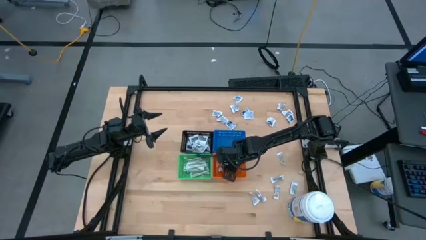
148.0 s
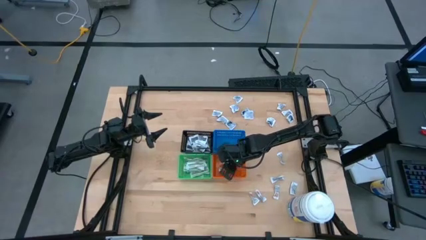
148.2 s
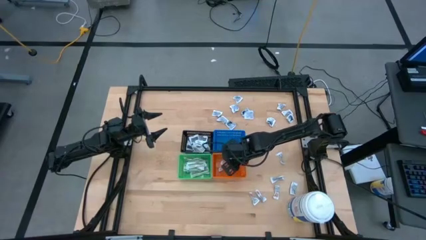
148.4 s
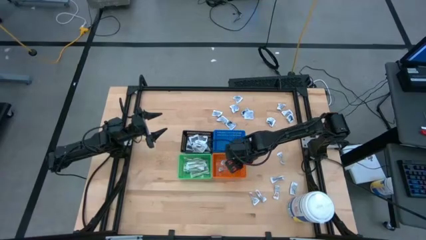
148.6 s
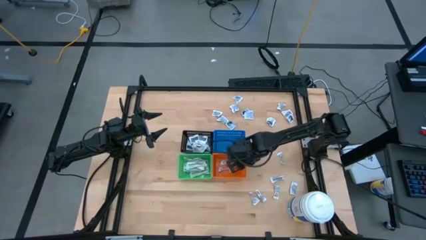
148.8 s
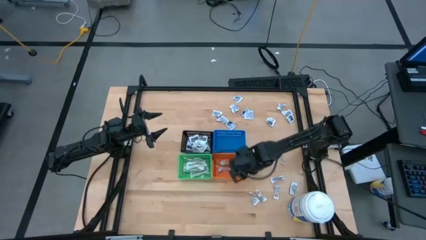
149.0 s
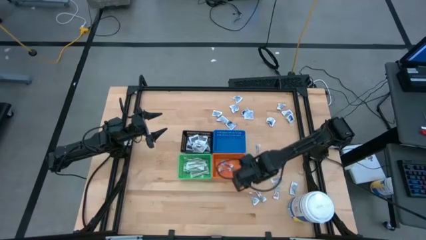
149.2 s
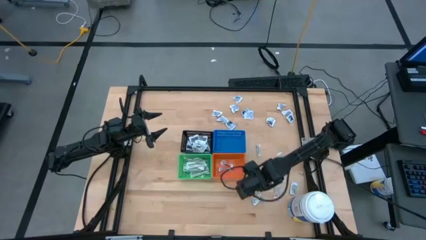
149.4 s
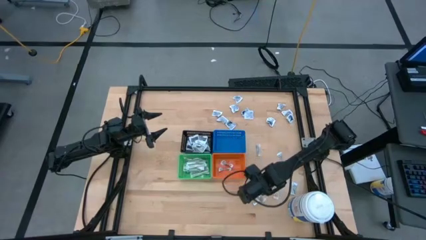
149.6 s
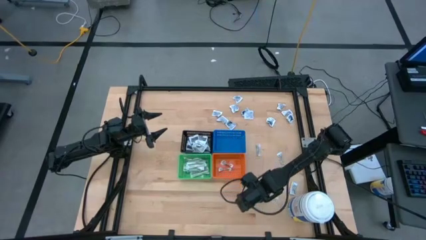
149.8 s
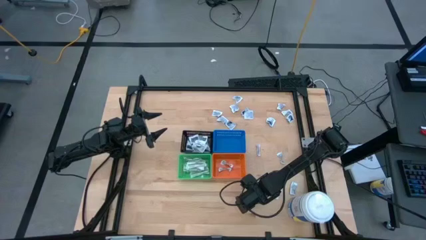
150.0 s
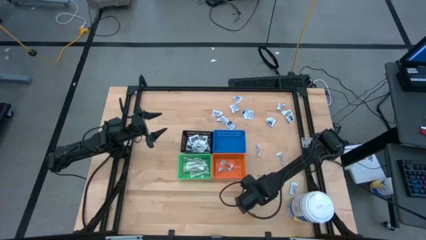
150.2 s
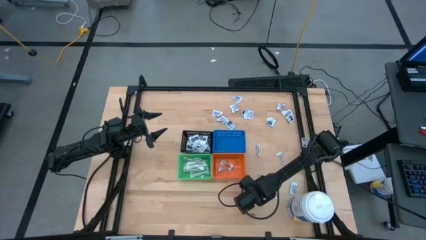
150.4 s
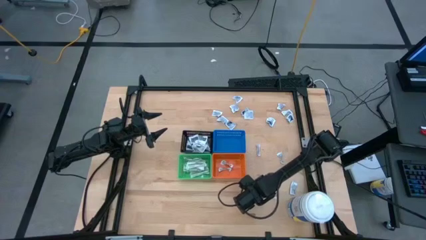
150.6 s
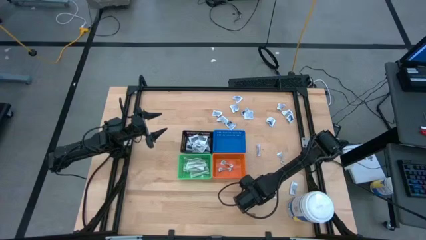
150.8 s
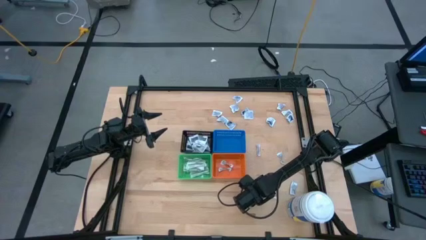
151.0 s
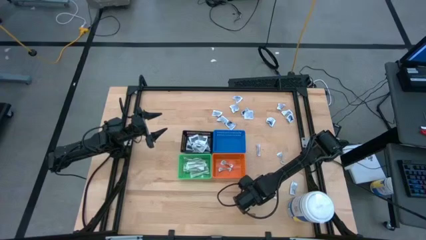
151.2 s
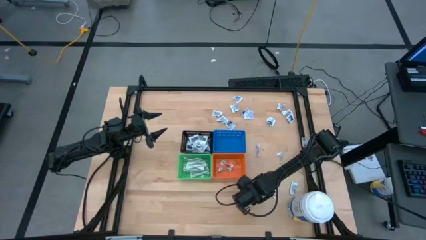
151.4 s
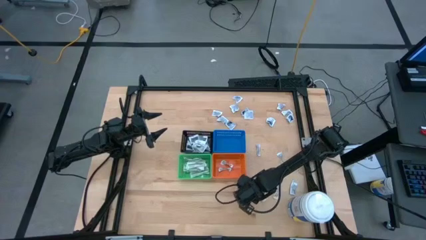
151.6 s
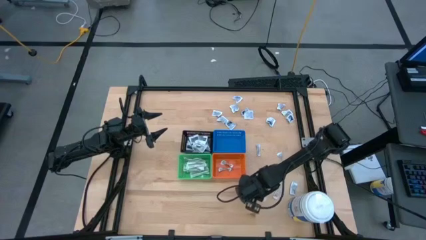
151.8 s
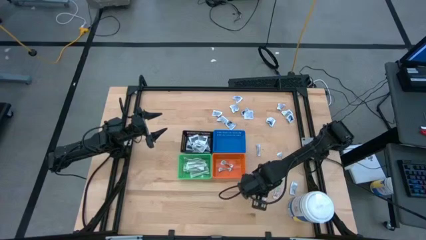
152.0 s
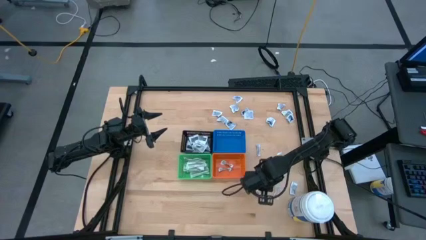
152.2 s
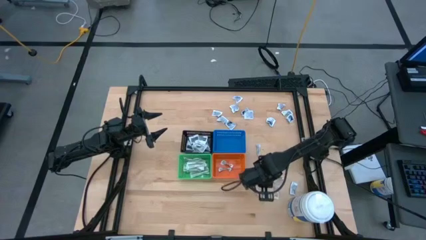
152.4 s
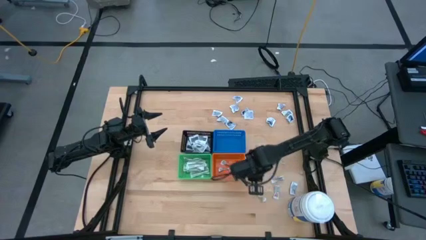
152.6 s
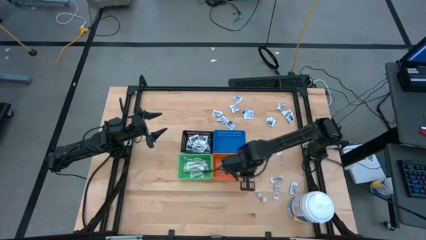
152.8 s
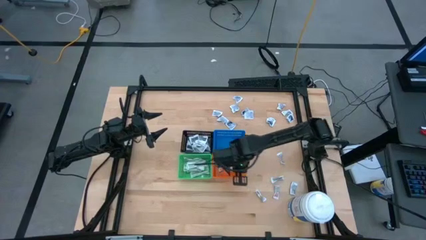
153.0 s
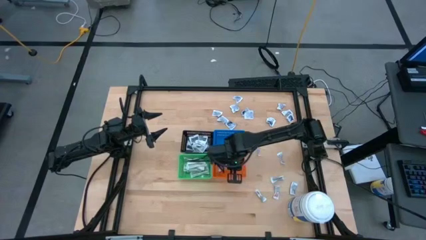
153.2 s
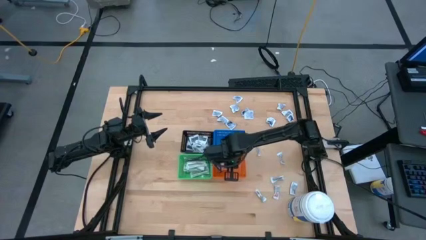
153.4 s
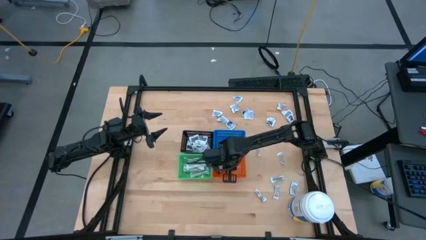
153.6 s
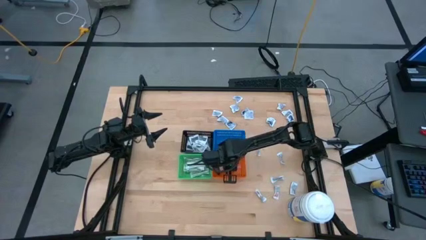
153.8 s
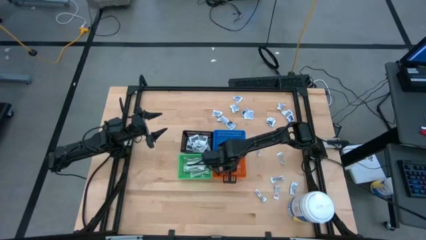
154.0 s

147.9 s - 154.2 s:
Task: Pick & Place First Aid Supplies
Put the ointment pack into the orange bin

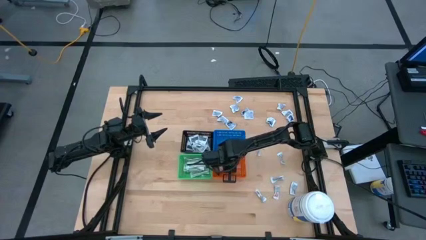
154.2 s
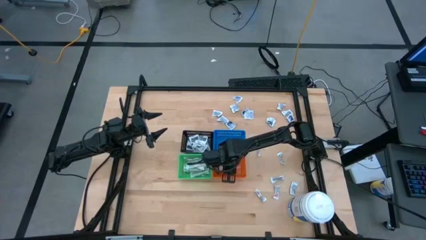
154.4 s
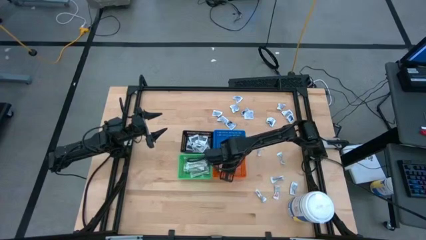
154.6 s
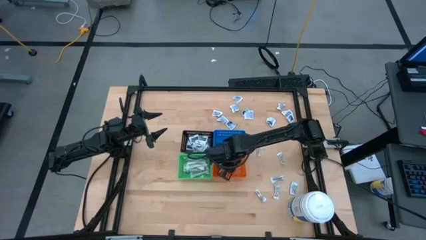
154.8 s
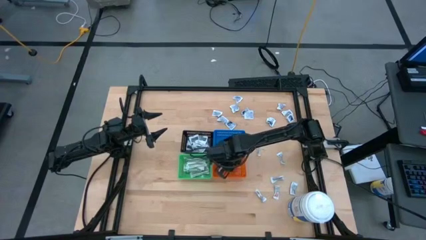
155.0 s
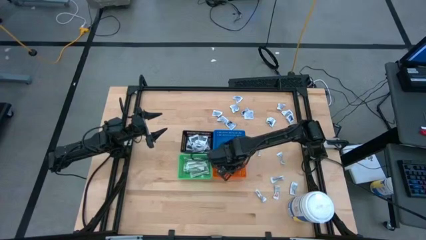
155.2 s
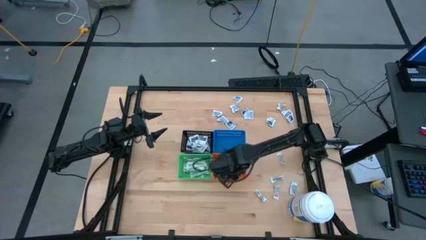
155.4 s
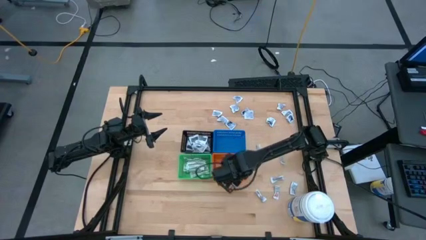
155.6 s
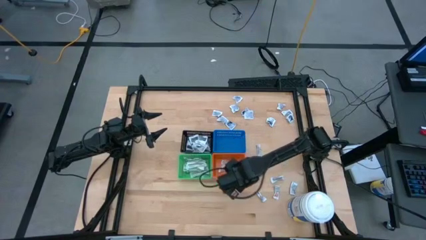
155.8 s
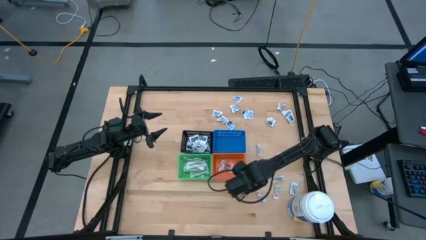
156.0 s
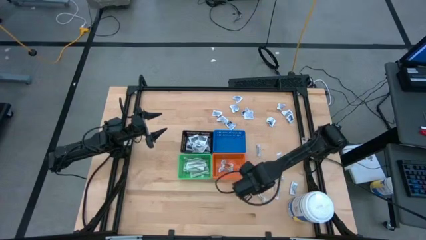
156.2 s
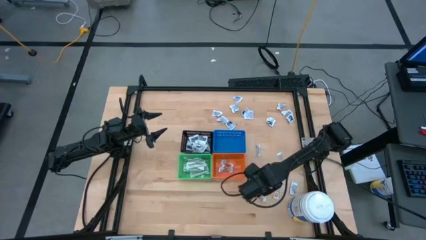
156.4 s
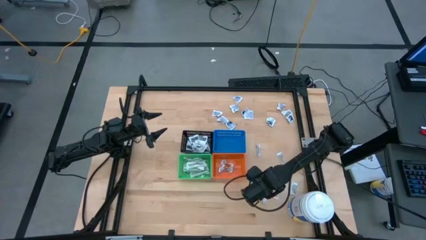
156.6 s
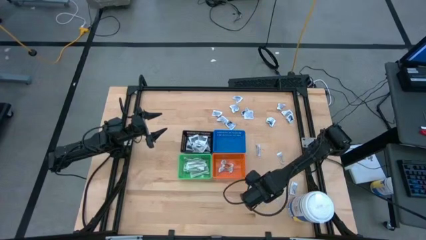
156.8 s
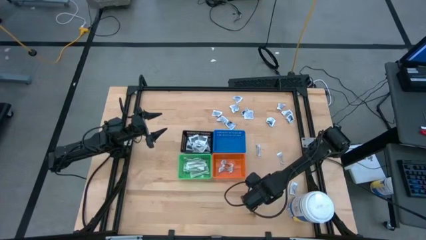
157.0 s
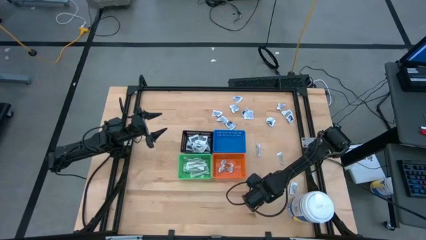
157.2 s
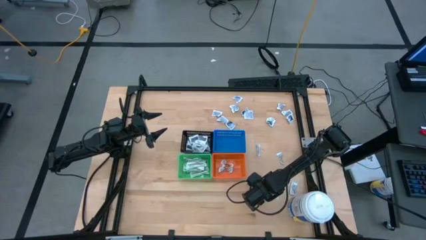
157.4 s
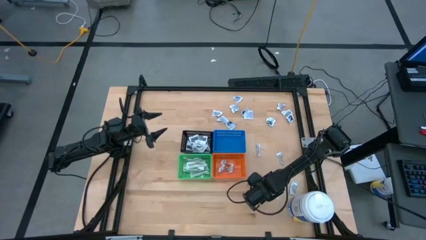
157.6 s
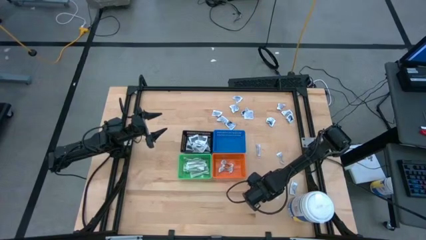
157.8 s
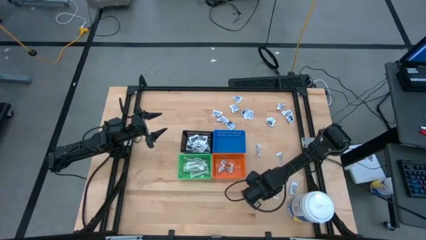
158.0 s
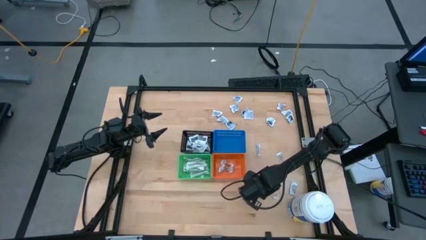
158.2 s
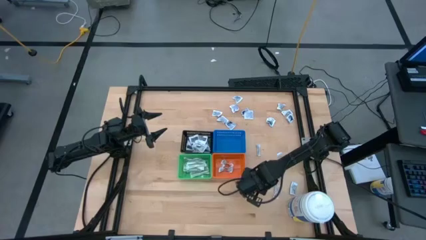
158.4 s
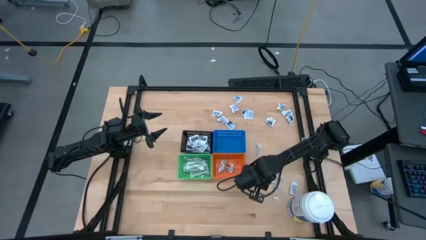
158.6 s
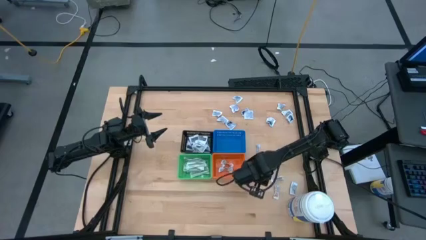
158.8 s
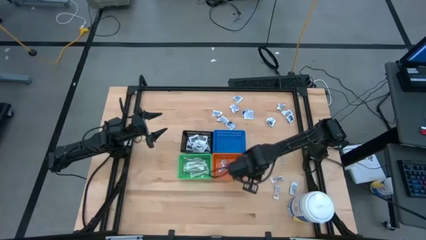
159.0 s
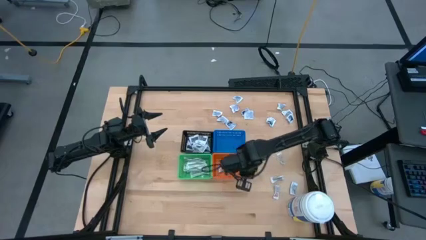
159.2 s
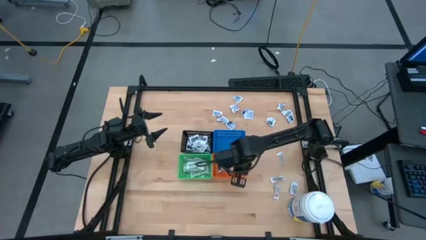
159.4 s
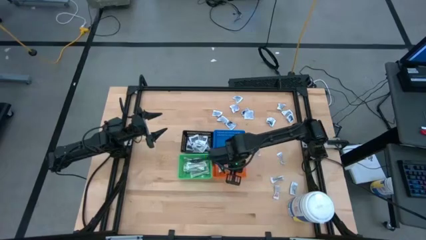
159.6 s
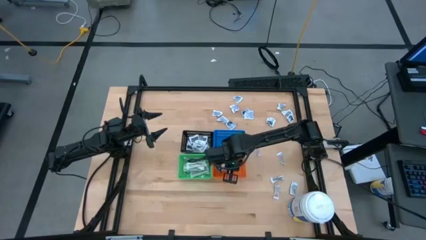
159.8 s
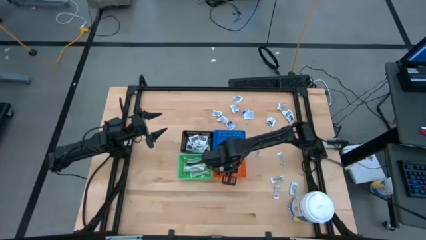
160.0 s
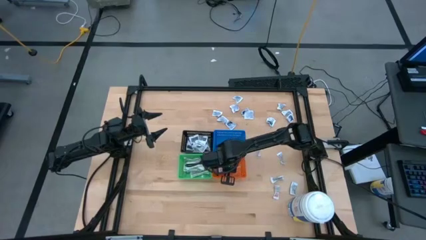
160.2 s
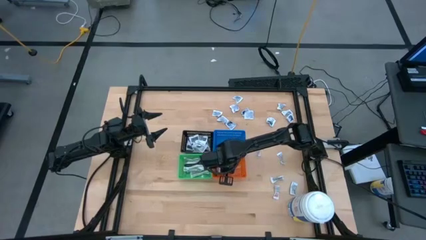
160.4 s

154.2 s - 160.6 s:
Put the ointment pack into the orange bin

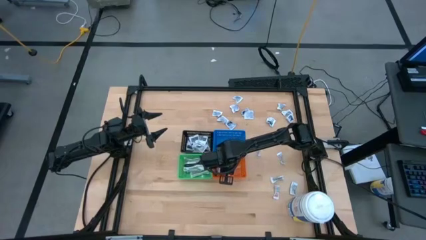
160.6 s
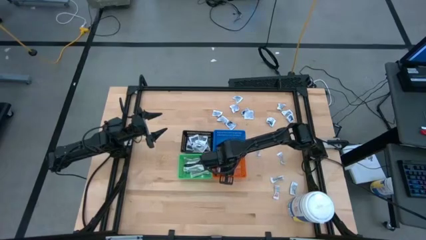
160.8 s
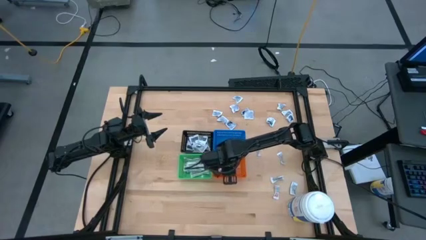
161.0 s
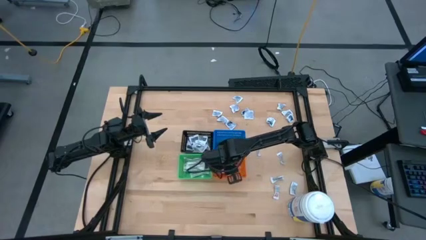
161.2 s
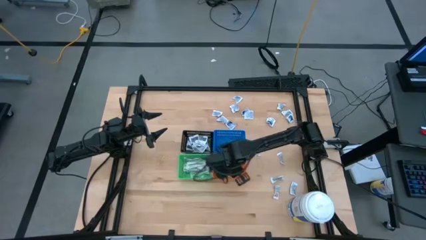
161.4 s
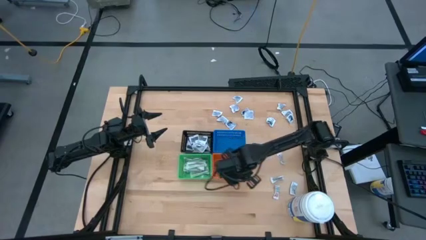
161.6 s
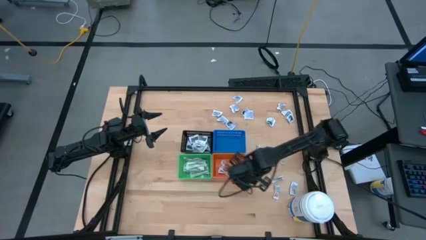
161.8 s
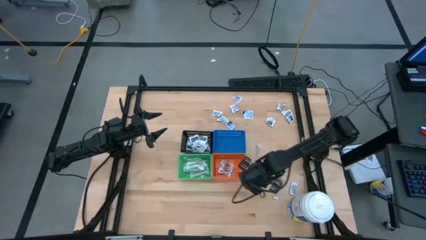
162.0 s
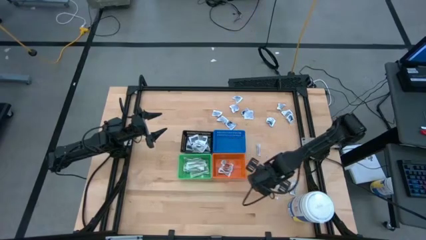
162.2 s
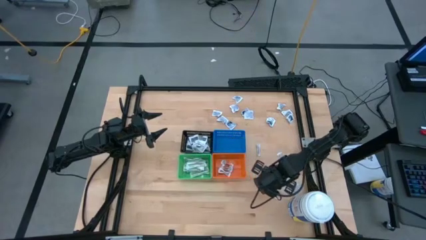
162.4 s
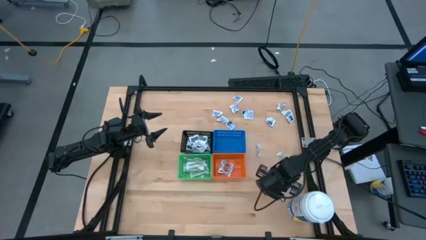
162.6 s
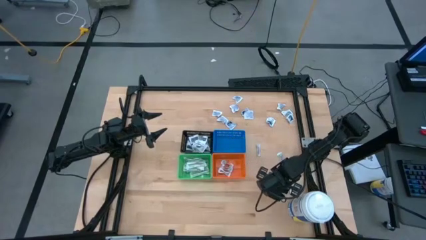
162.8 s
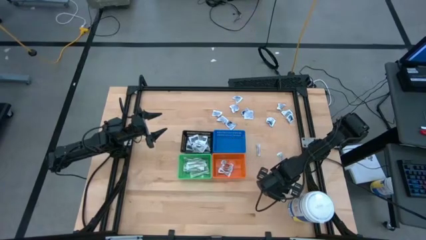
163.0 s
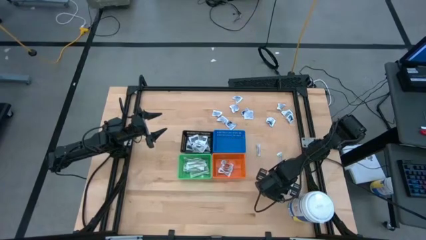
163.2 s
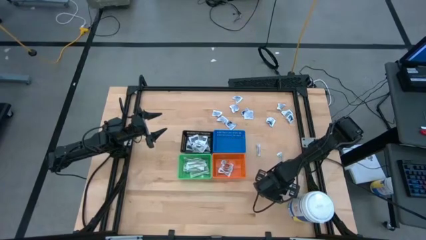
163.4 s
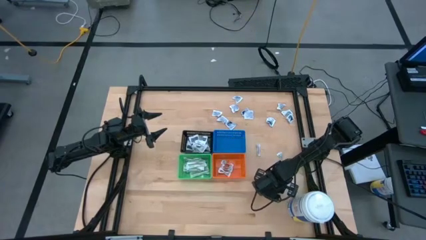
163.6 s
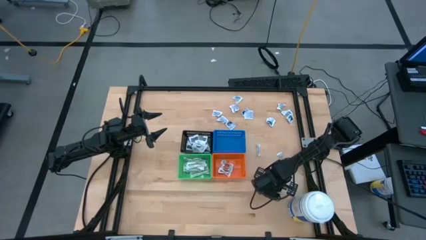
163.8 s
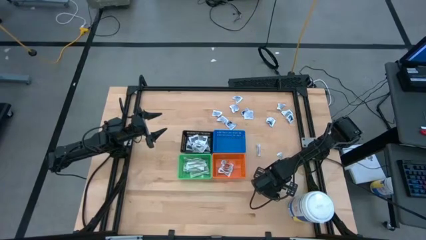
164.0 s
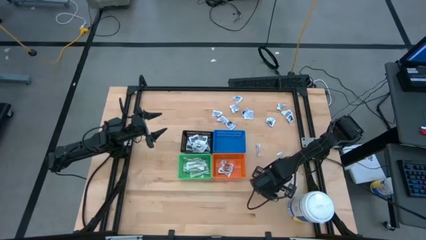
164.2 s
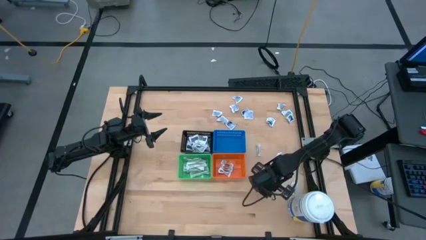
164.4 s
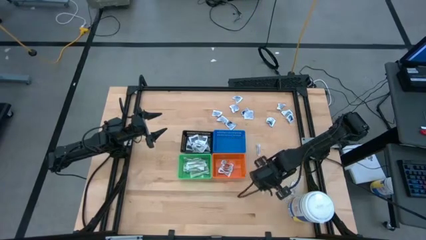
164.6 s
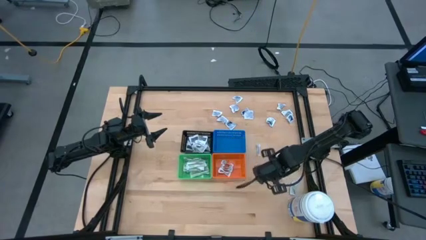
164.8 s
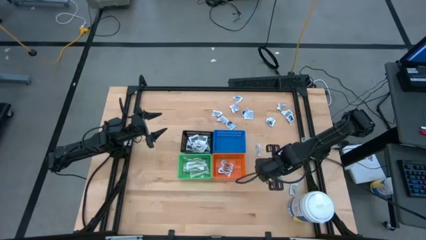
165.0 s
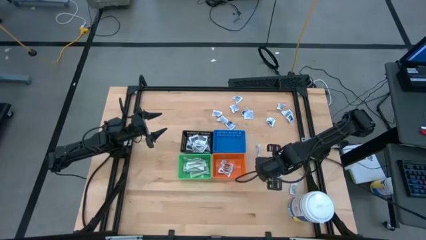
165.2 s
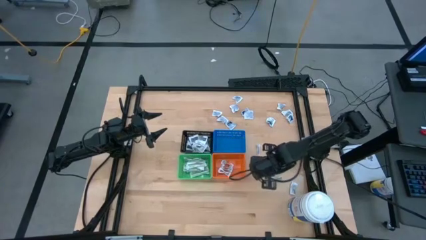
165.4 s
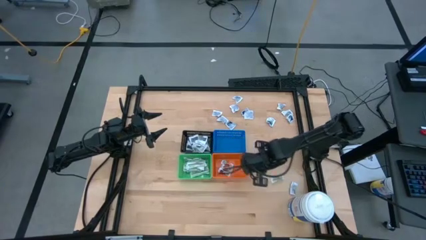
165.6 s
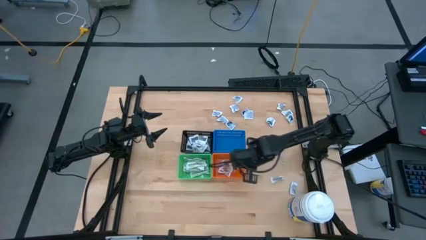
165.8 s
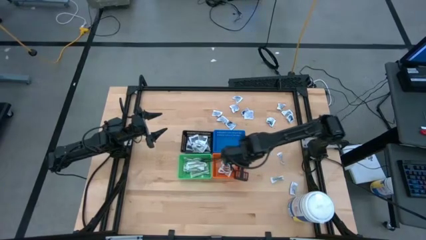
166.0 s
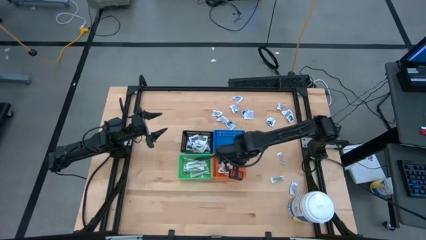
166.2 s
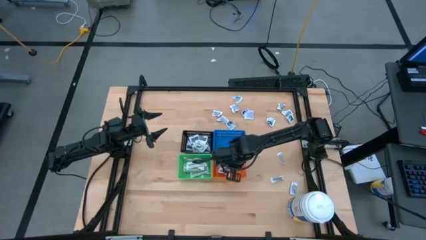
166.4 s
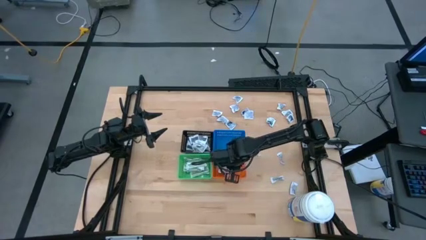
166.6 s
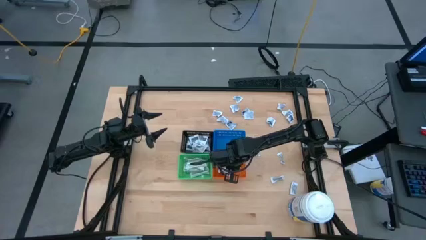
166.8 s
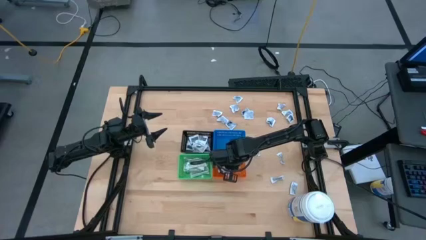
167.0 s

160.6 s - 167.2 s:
Put the ointment pack into the orange bin
